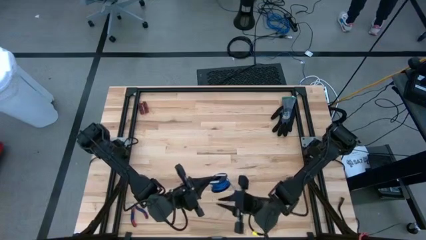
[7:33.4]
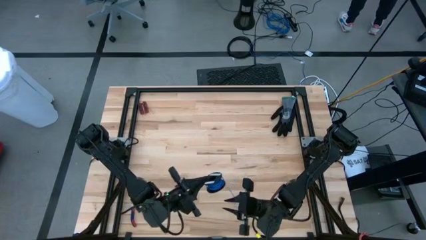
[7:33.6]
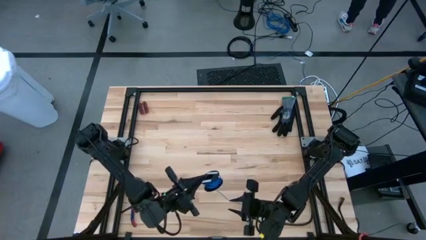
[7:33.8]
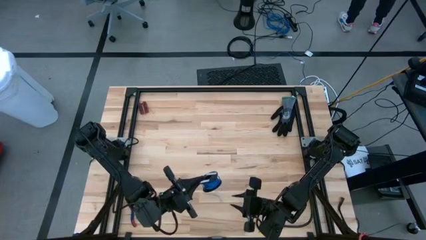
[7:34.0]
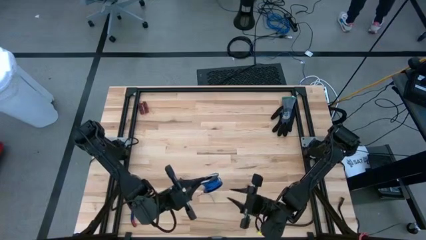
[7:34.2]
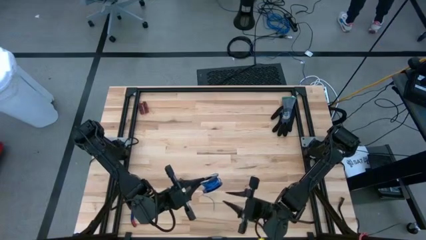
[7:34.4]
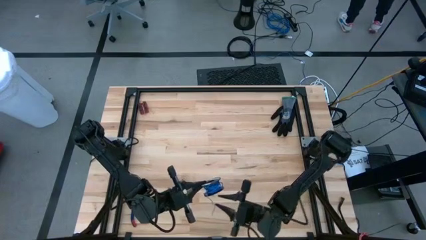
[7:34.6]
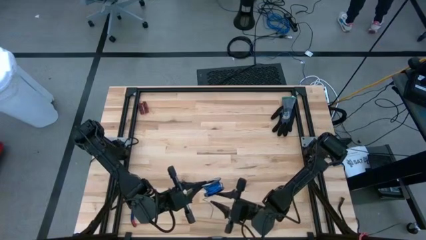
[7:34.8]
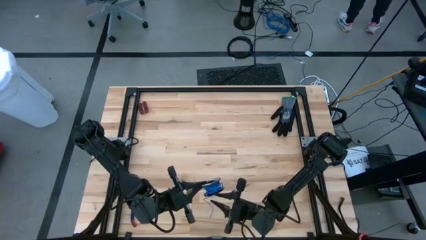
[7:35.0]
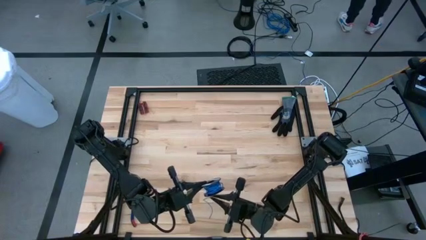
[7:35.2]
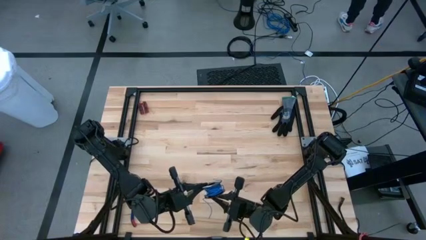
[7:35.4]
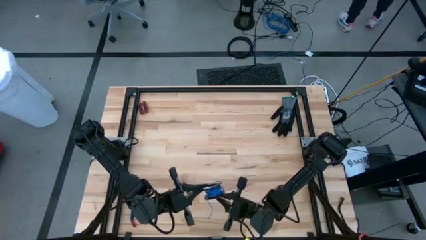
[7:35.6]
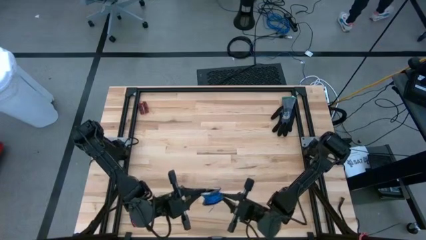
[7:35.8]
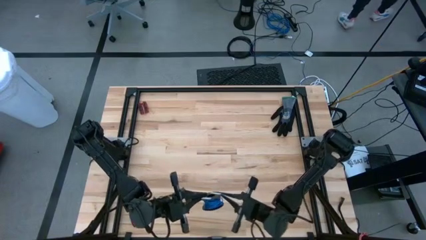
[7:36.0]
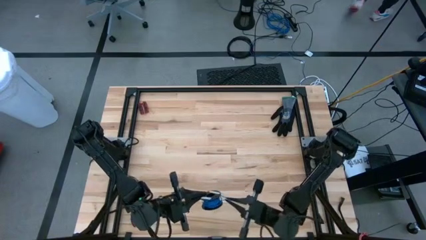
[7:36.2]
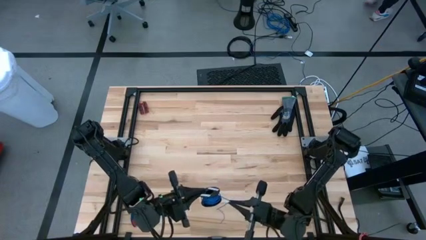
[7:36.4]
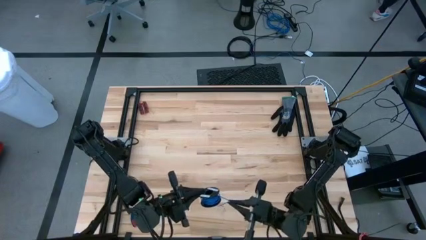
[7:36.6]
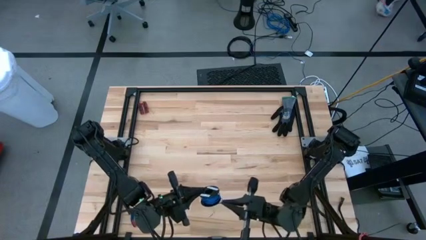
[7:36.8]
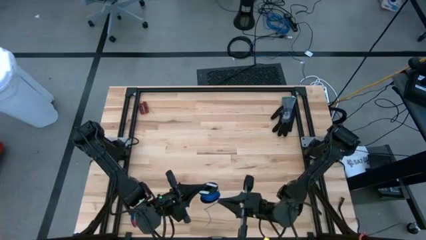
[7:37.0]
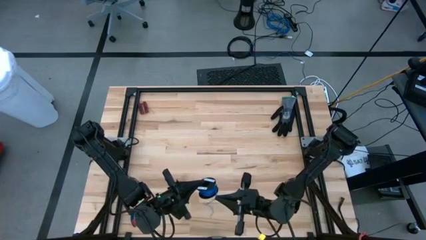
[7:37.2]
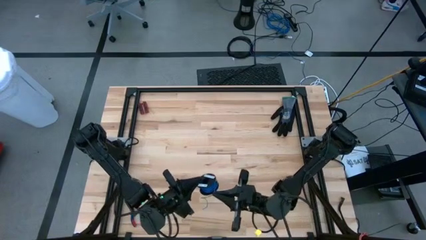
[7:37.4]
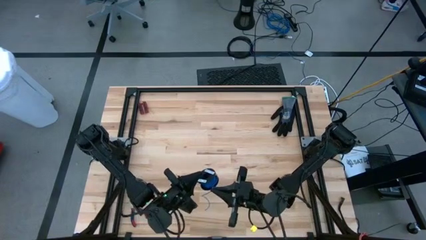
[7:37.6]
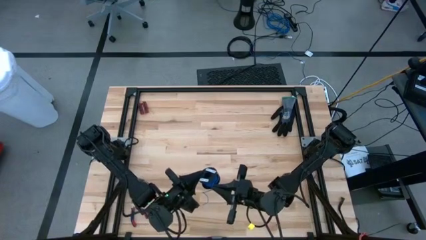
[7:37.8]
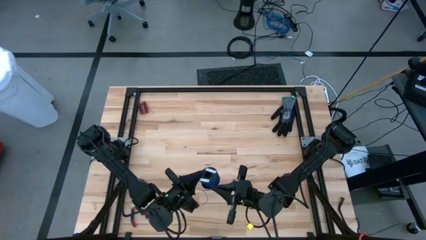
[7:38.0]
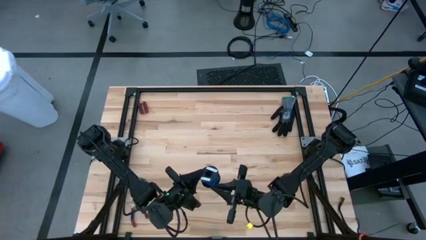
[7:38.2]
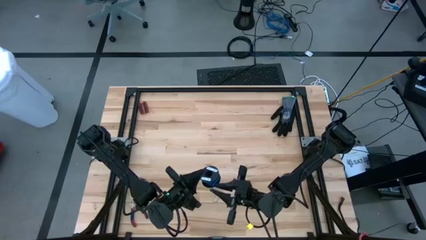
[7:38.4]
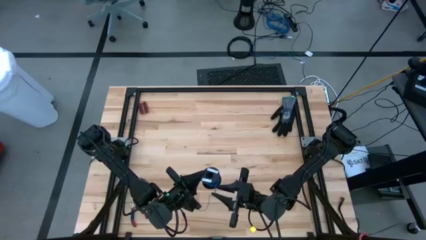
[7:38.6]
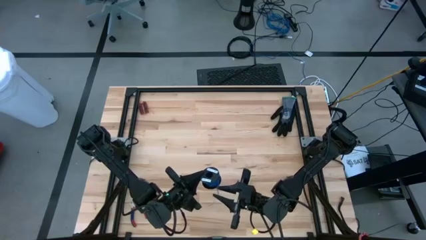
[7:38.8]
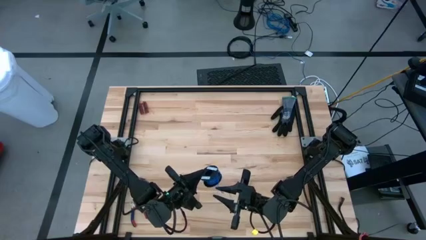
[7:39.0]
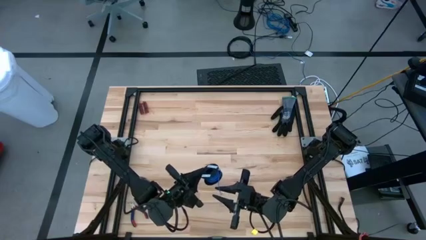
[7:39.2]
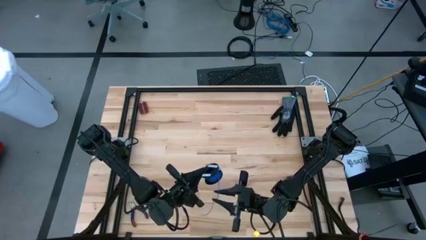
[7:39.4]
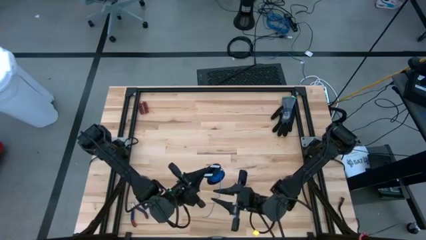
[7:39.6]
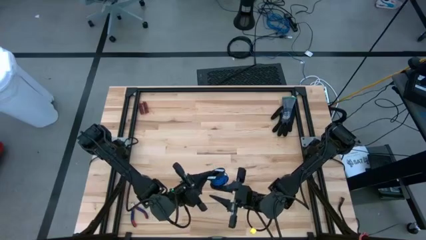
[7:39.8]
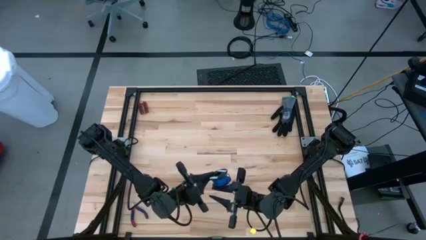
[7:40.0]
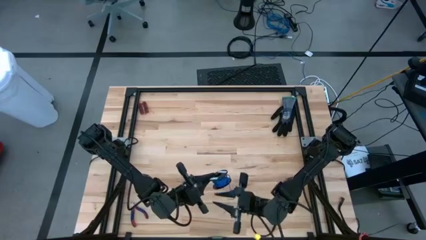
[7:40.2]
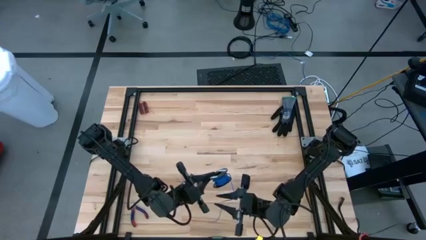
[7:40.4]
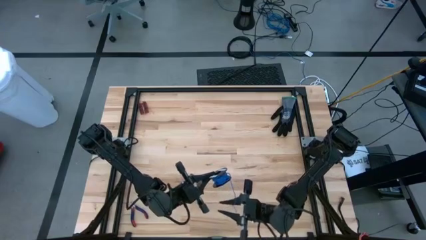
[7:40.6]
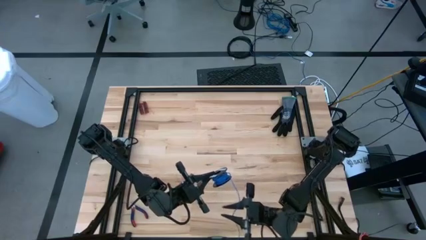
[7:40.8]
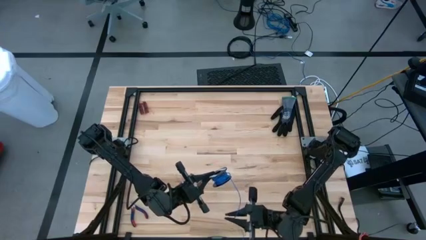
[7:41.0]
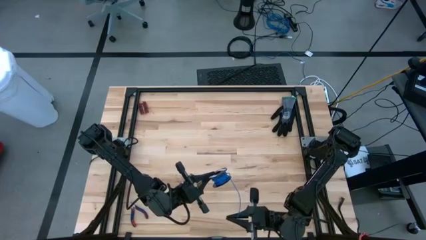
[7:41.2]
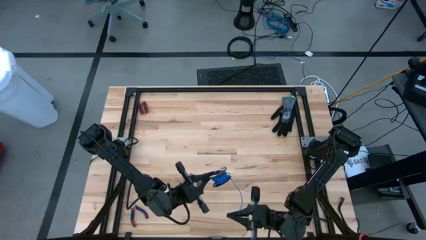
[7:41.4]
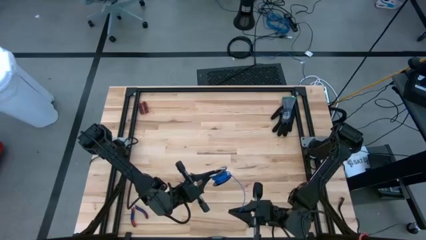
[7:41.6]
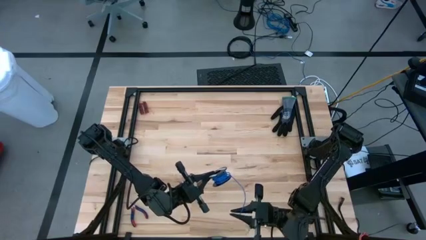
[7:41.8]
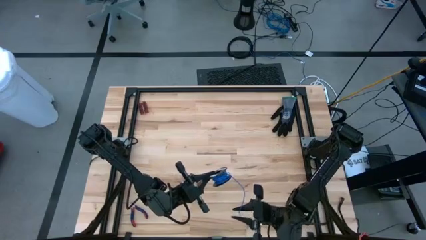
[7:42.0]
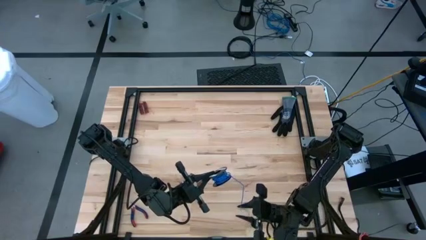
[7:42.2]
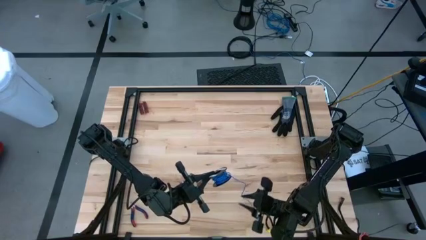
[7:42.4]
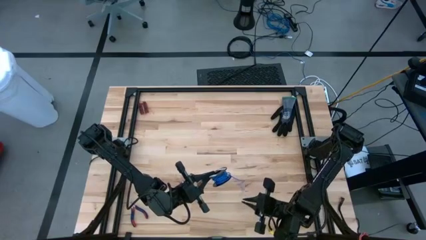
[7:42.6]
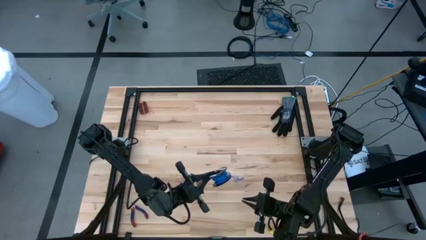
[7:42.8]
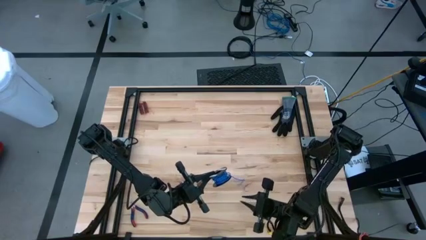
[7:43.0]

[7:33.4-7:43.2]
Task: Coil cords
Coil the green wire onto a spool

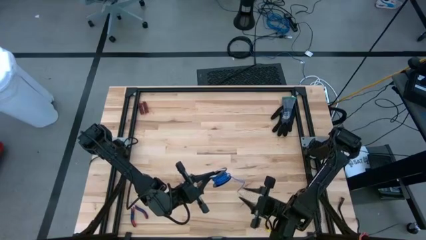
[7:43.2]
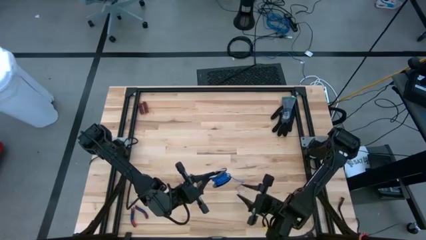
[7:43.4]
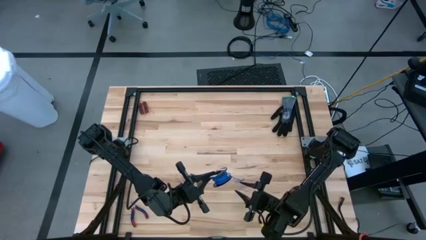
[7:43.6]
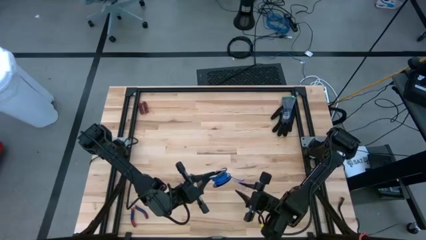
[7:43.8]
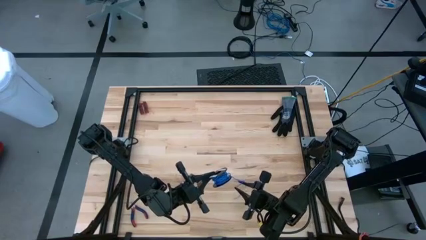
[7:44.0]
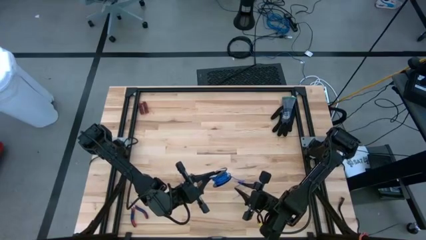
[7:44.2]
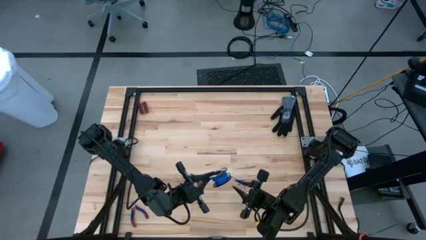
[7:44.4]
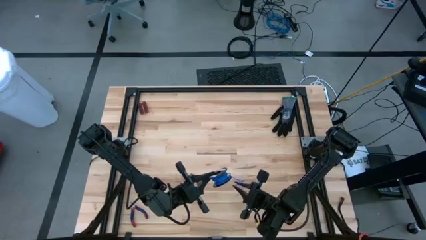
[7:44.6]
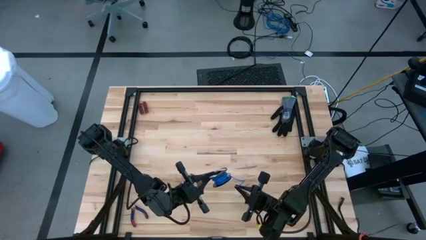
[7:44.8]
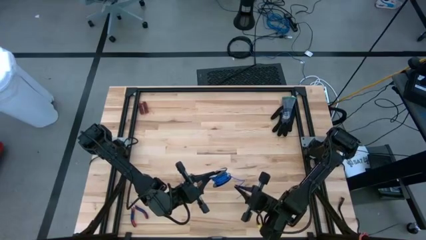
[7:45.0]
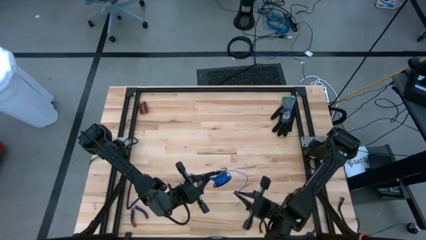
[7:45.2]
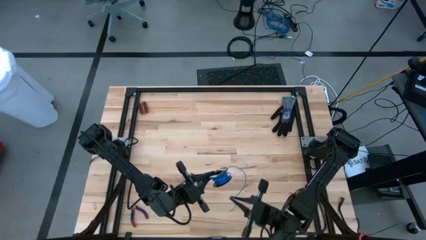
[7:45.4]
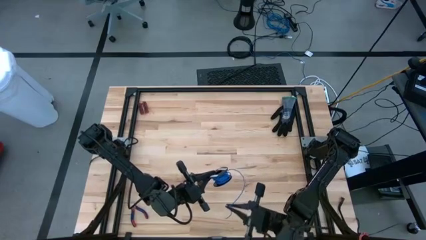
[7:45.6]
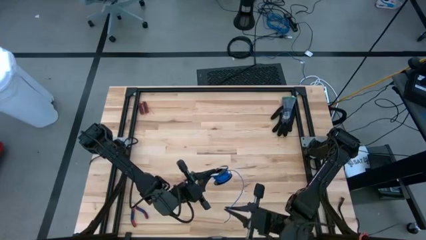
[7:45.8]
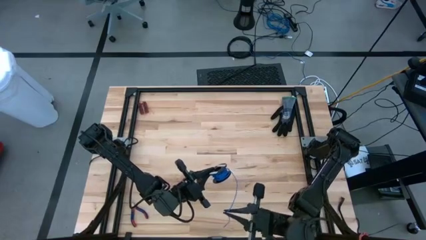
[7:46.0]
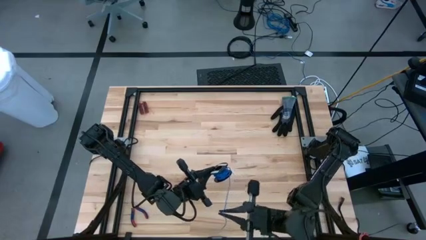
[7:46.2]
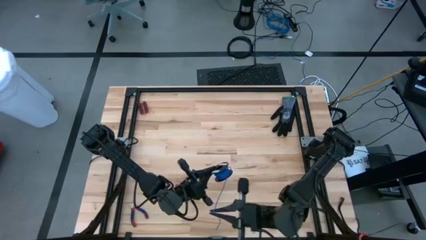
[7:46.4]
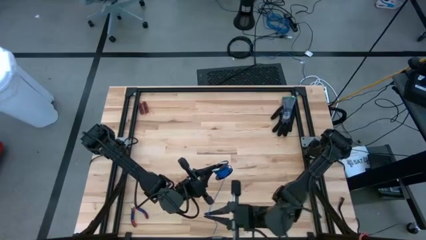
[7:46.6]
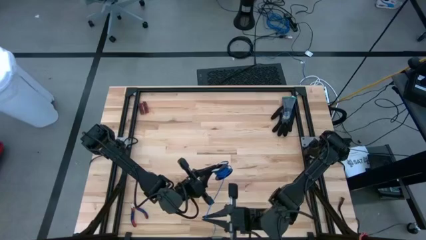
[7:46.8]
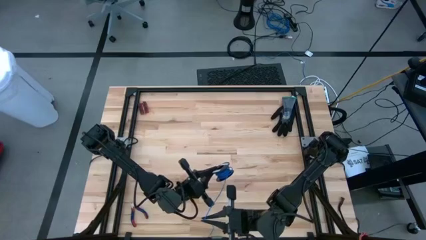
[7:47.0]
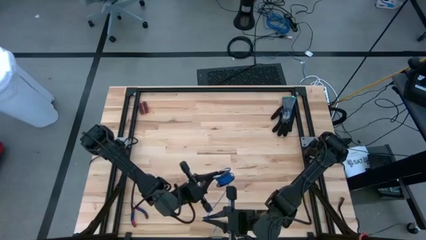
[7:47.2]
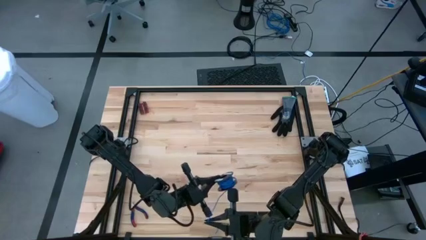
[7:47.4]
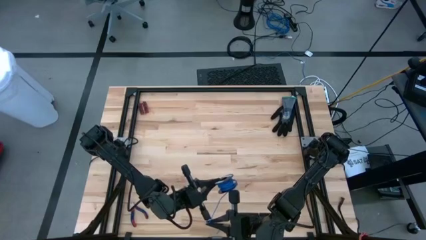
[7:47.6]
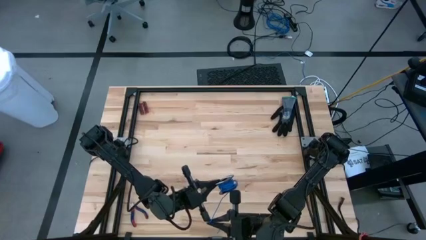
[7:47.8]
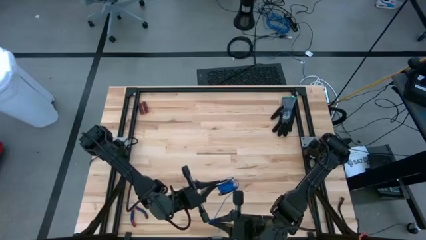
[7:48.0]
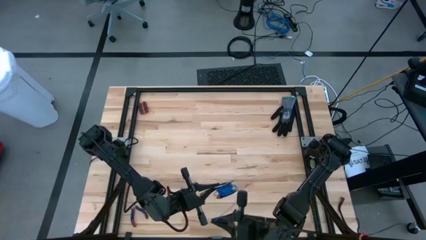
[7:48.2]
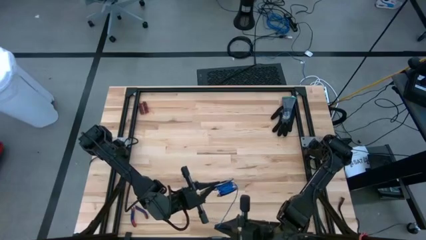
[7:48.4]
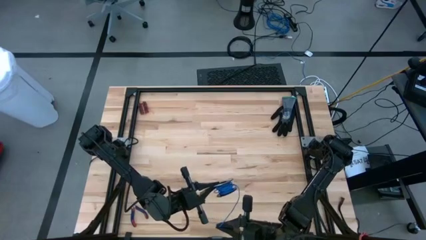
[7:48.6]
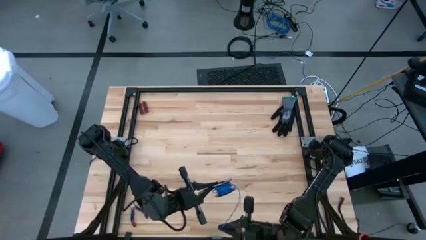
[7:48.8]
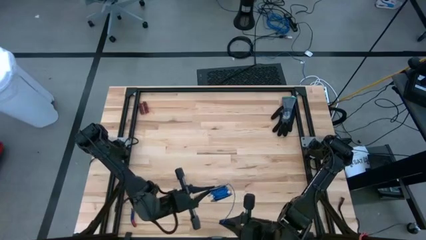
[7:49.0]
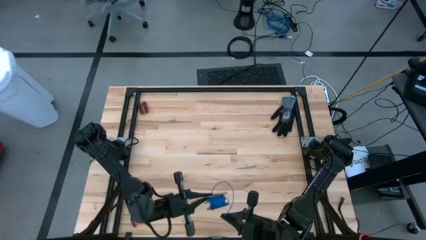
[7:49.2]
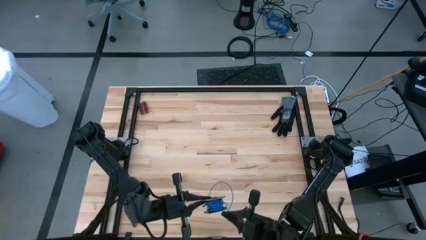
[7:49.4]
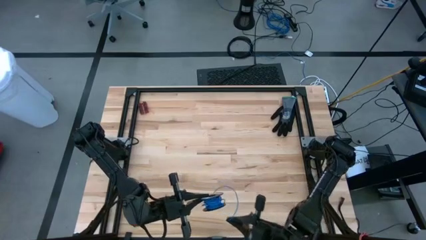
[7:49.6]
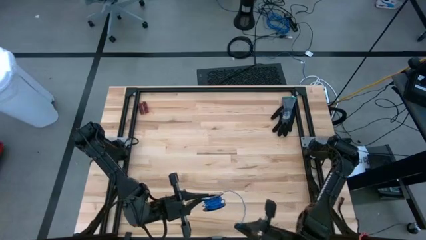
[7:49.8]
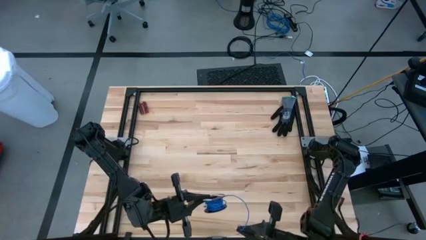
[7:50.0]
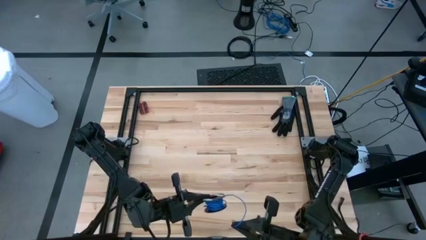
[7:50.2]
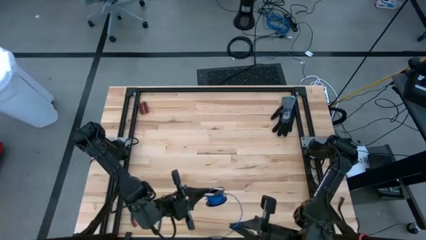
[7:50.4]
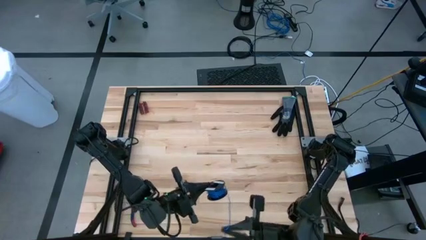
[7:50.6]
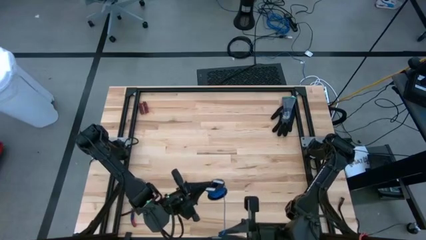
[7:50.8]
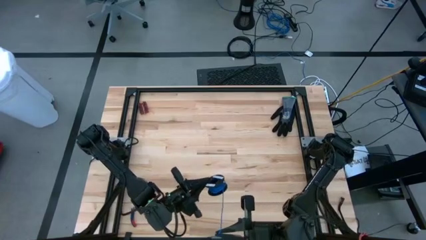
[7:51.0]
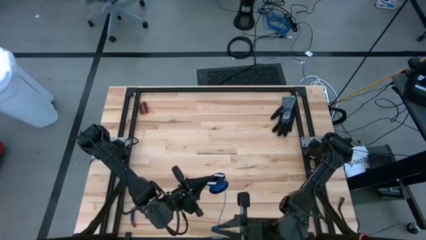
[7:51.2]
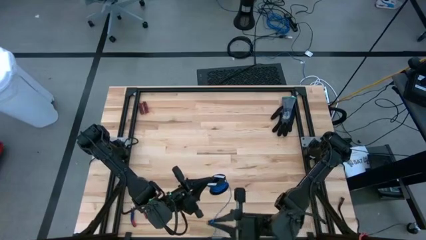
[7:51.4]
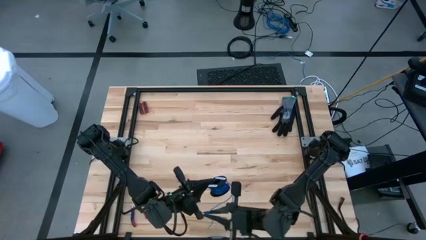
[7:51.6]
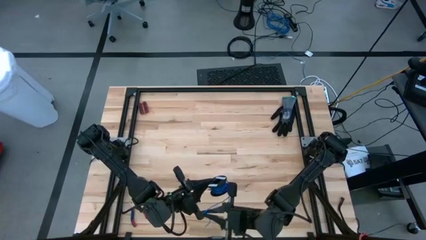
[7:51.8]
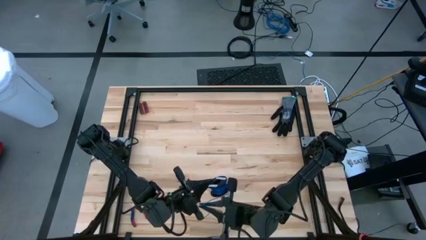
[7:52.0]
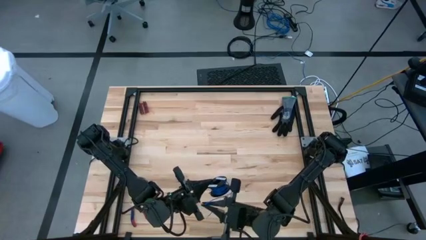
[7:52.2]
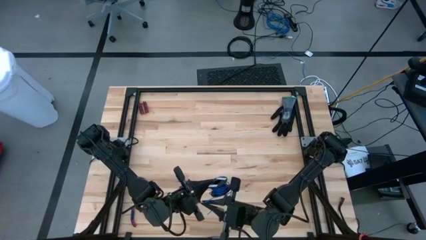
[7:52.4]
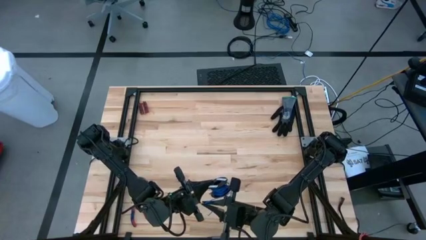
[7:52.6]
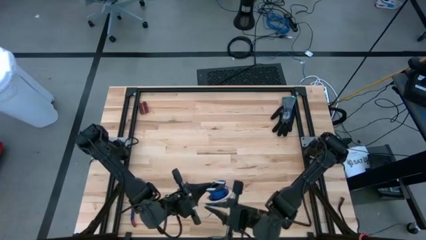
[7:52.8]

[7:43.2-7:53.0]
Coil the green wire onto a spool
